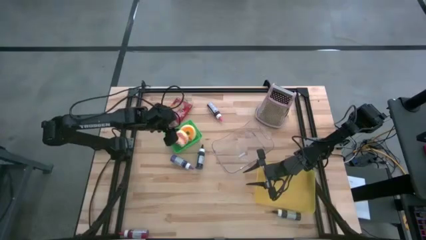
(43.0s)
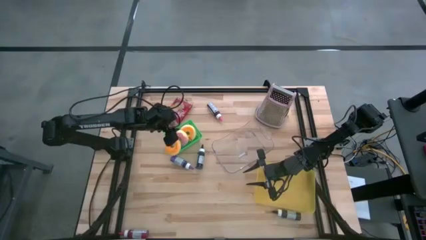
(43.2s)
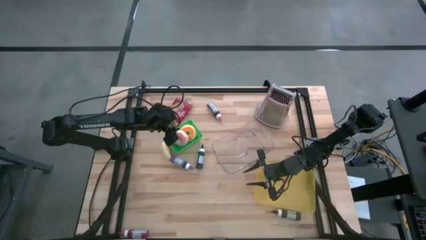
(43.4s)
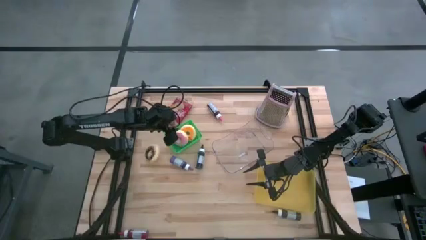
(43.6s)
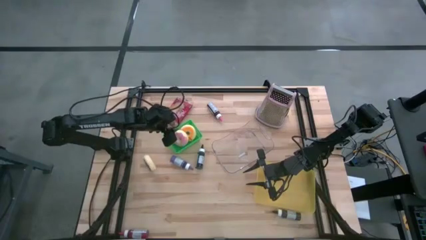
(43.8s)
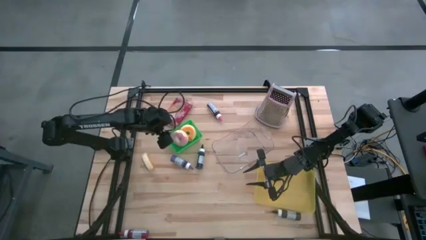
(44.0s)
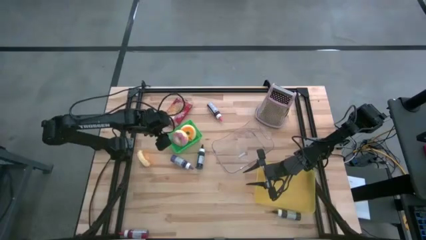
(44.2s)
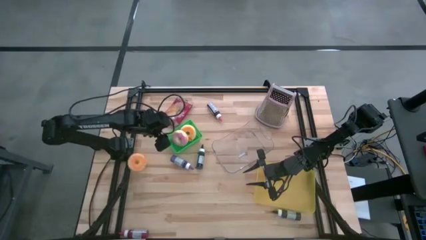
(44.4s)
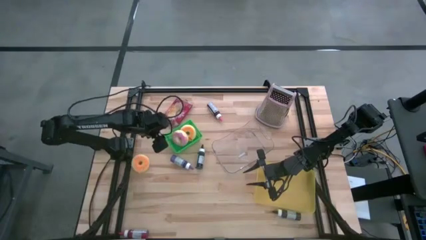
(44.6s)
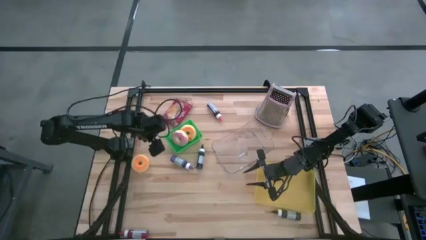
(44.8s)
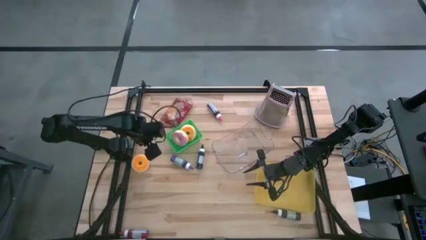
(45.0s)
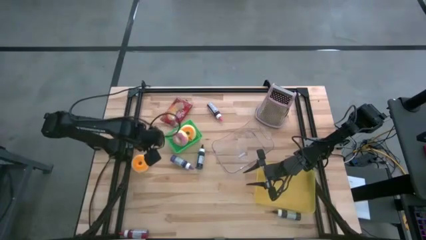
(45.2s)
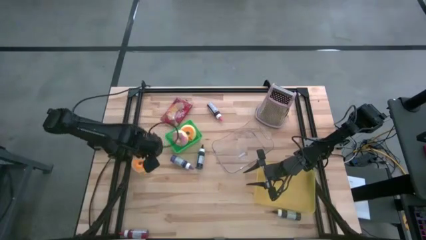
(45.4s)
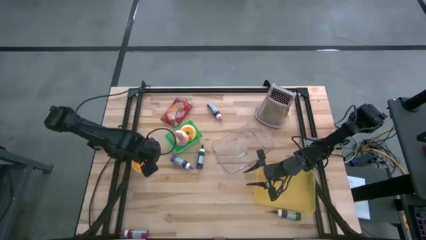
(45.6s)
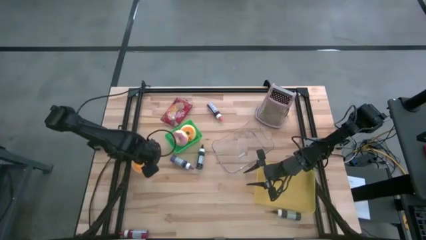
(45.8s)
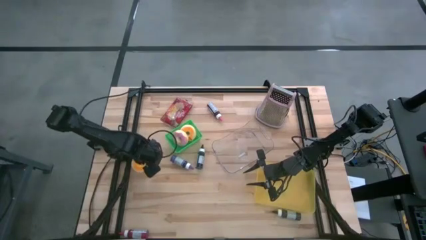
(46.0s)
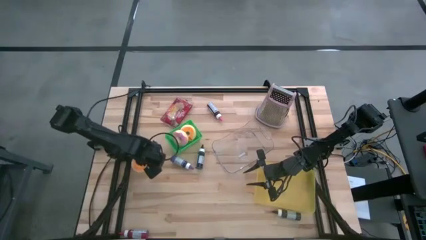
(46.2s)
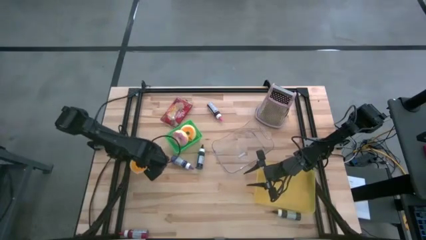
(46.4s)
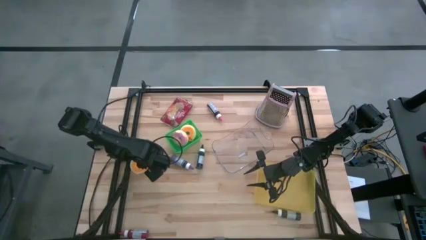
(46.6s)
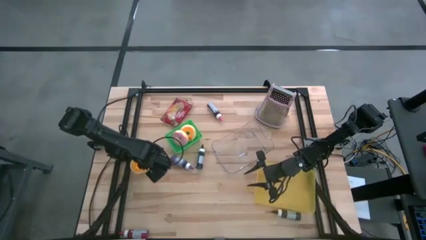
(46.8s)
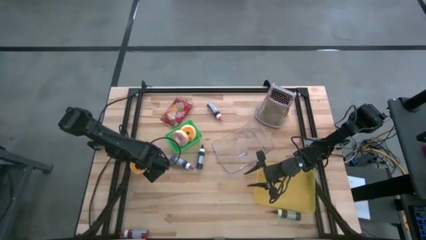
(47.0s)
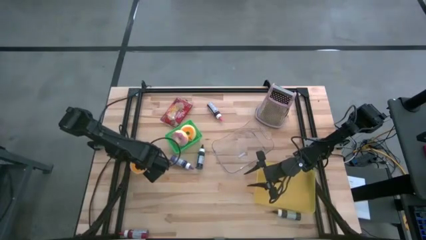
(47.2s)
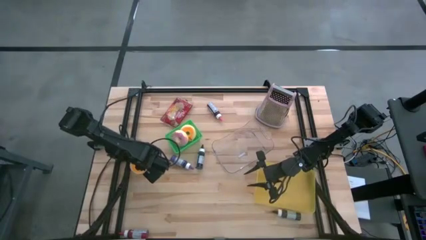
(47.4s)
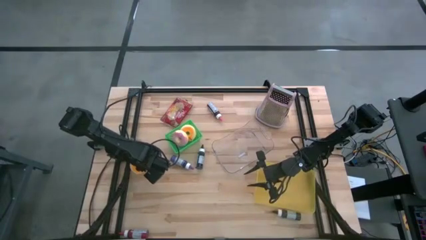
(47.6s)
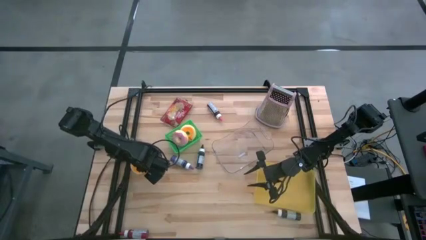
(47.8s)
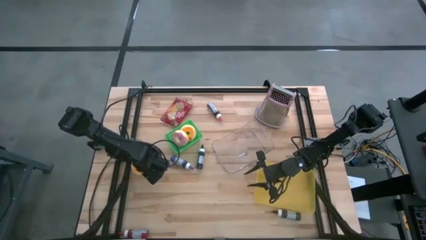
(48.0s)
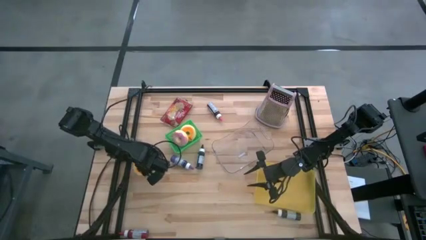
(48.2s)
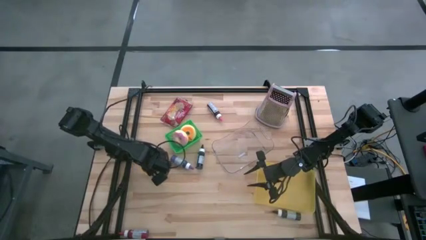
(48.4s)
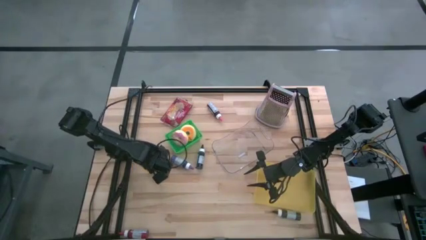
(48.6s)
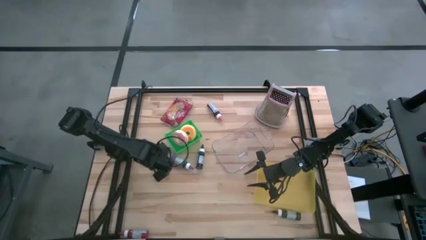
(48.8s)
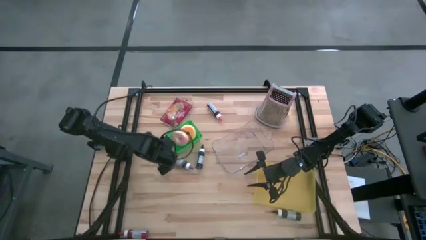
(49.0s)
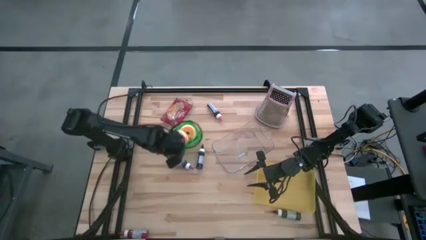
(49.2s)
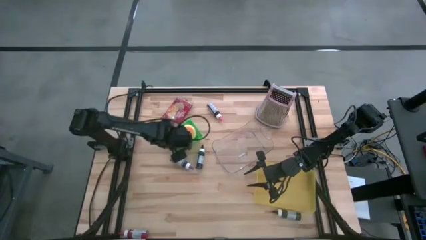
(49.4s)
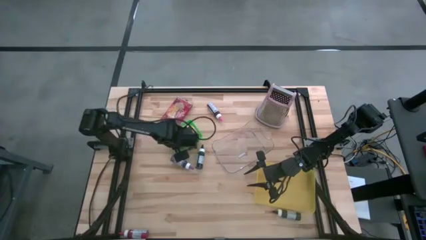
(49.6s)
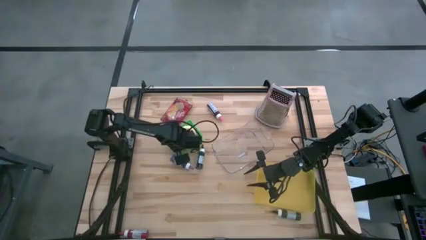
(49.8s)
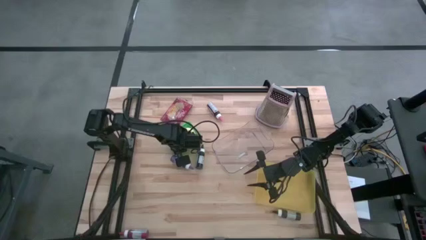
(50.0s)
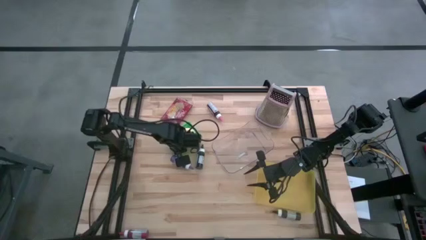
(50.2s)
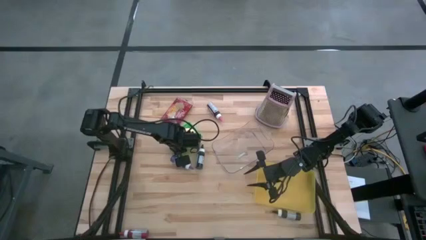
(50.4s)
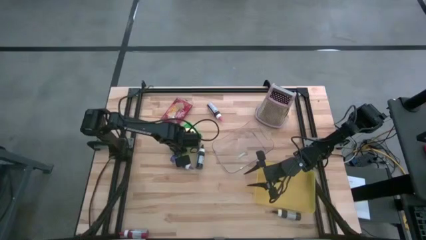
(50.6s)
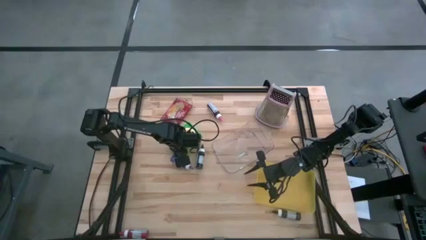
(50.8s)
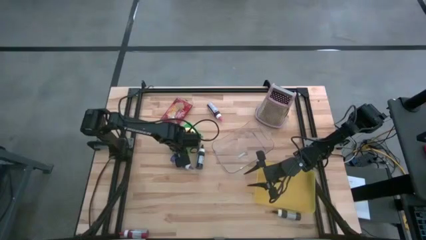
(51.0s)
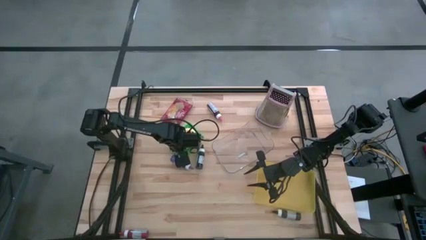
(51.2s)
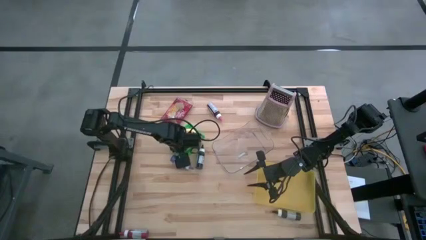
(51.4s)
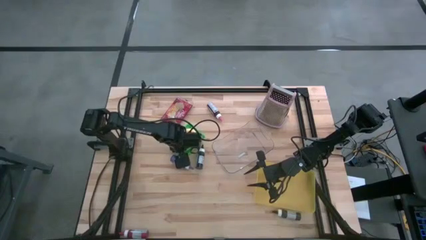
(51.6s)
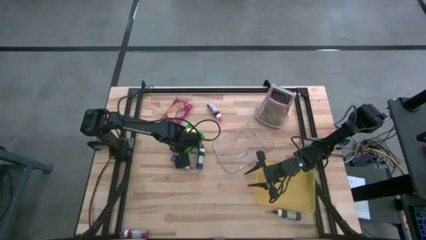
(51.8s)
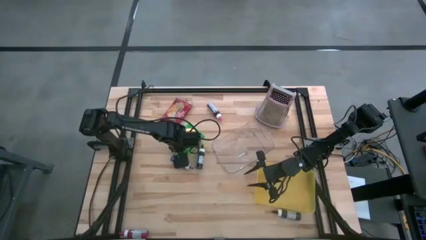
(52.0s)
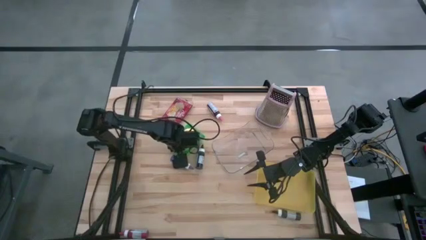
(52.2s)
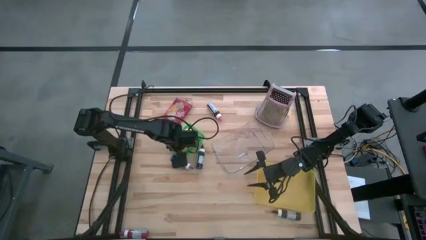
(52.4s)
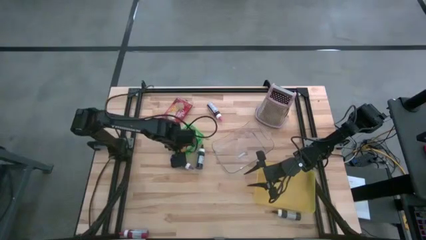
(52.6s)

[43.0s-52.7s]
Task: Pick & Place Food Item
Put the black donut into the green bin

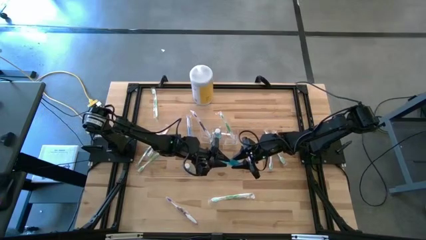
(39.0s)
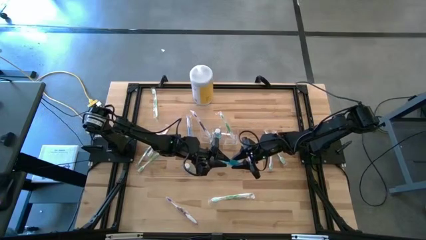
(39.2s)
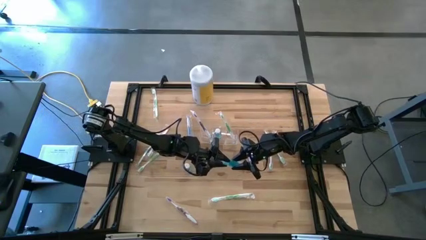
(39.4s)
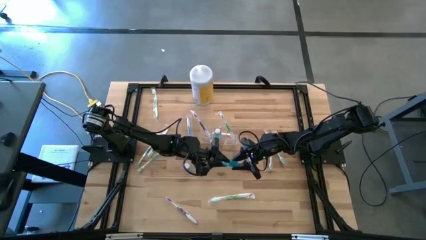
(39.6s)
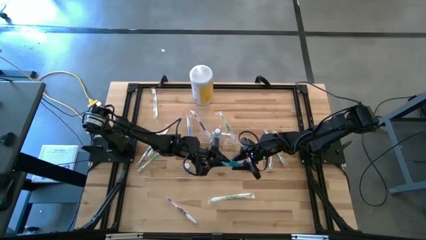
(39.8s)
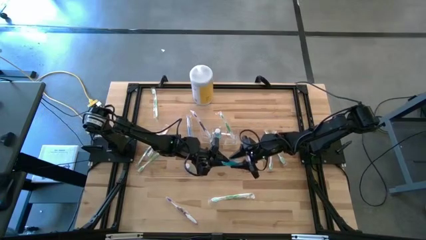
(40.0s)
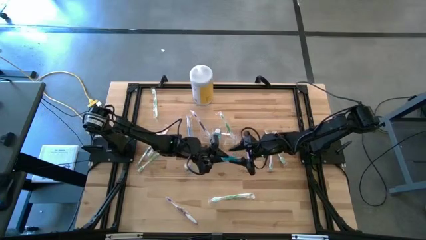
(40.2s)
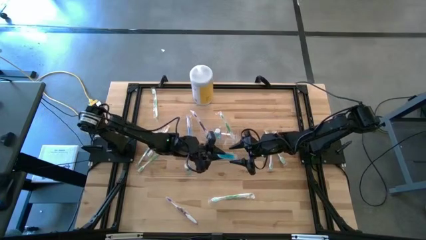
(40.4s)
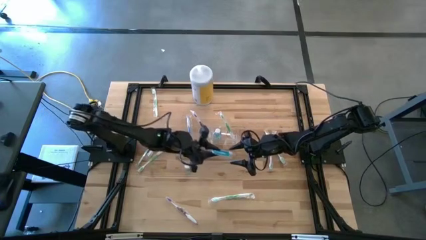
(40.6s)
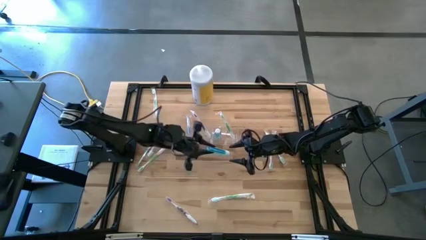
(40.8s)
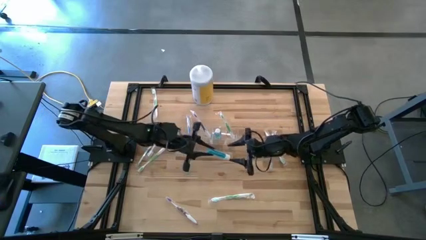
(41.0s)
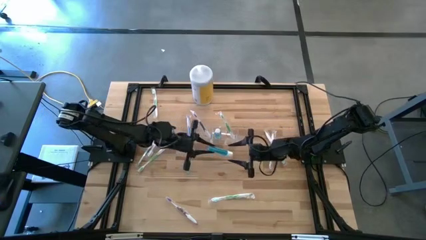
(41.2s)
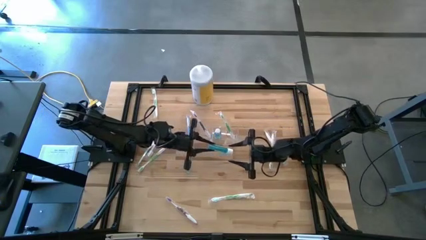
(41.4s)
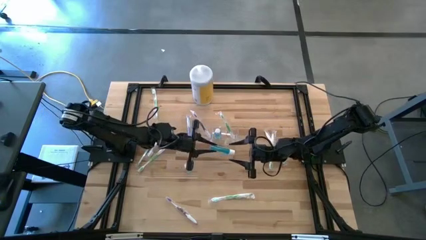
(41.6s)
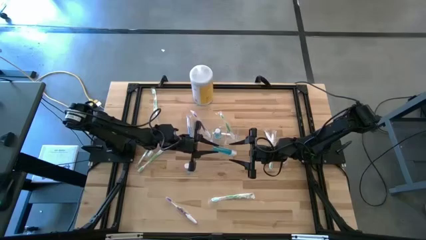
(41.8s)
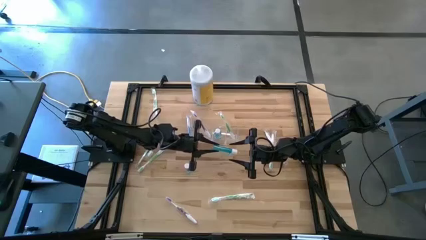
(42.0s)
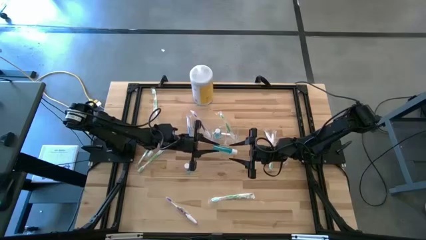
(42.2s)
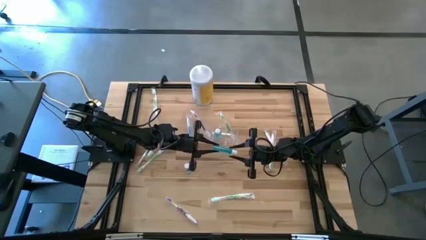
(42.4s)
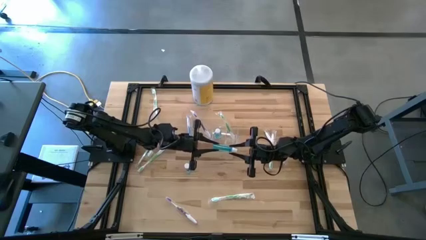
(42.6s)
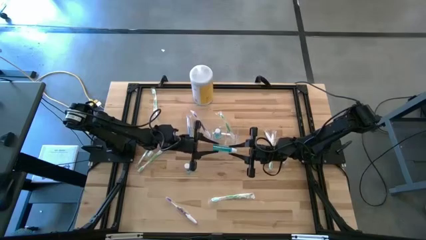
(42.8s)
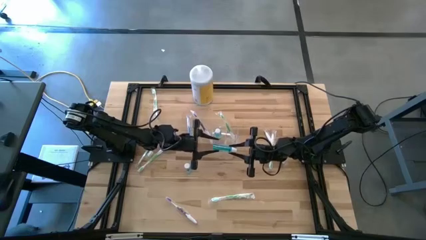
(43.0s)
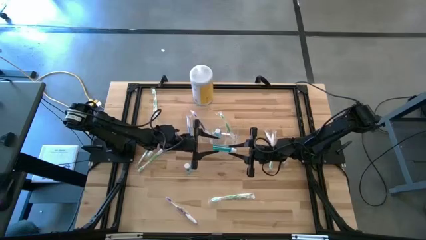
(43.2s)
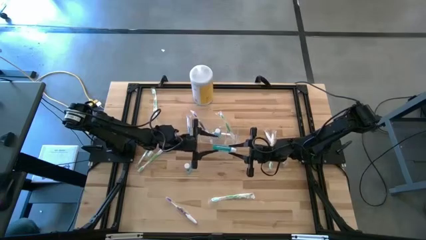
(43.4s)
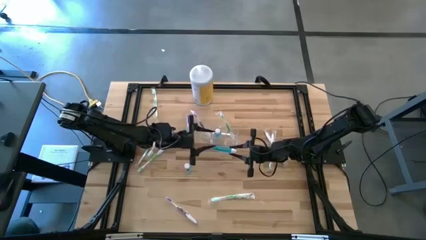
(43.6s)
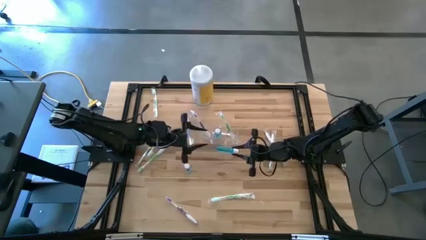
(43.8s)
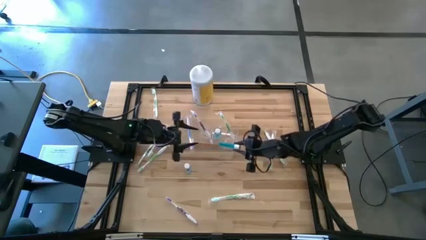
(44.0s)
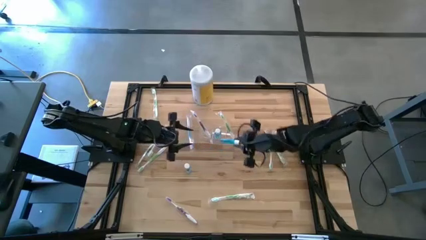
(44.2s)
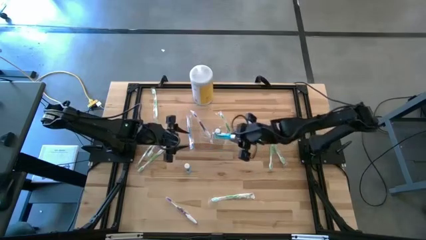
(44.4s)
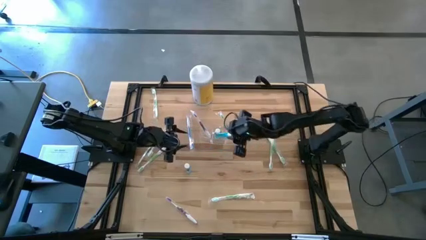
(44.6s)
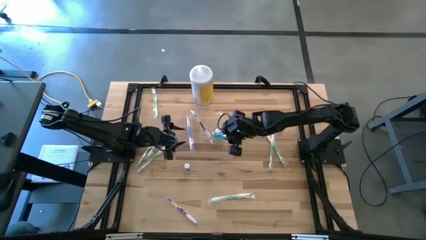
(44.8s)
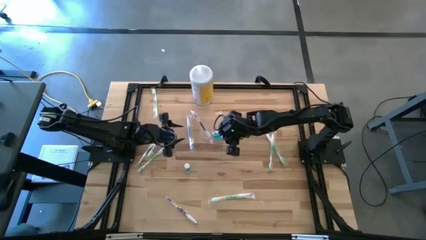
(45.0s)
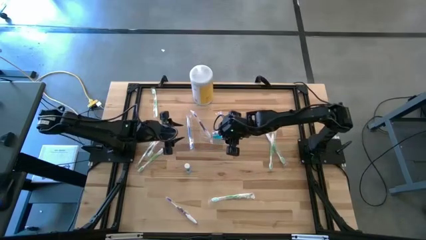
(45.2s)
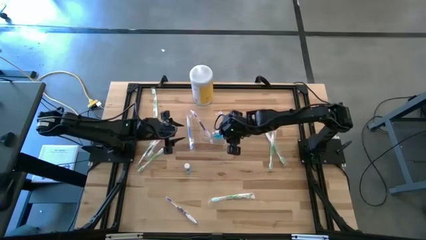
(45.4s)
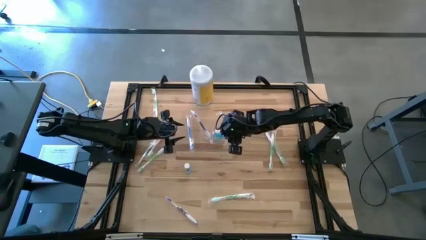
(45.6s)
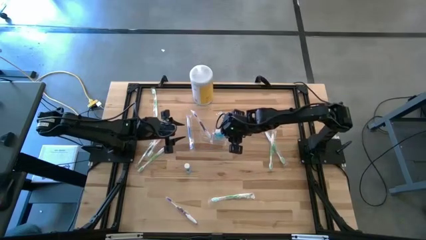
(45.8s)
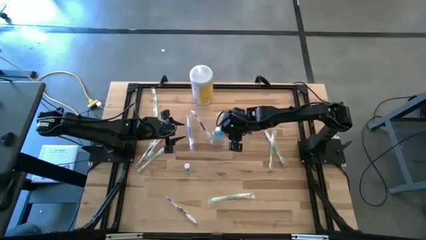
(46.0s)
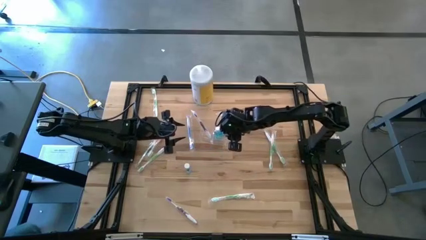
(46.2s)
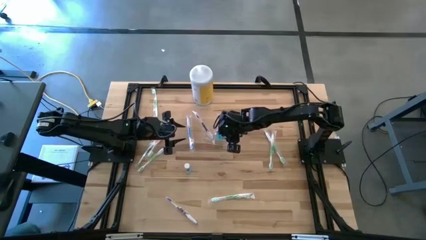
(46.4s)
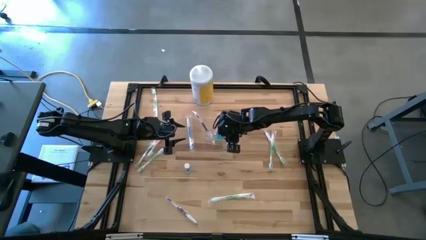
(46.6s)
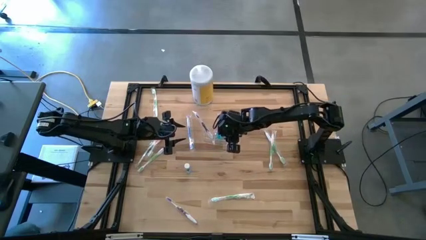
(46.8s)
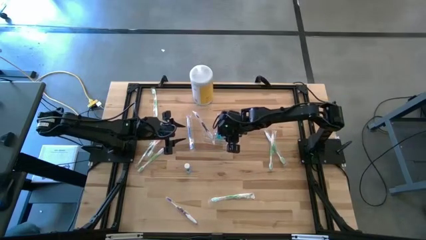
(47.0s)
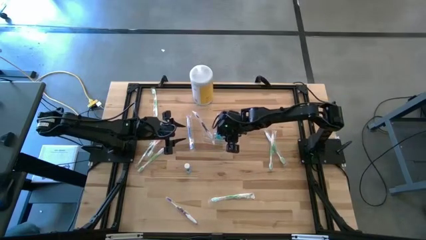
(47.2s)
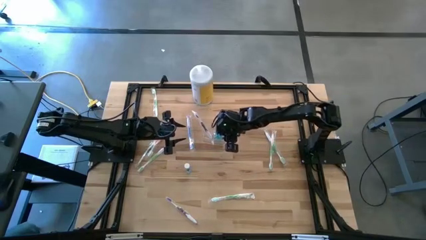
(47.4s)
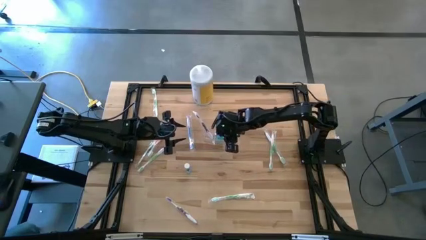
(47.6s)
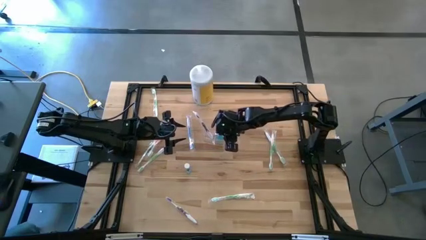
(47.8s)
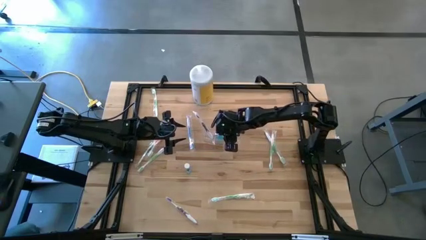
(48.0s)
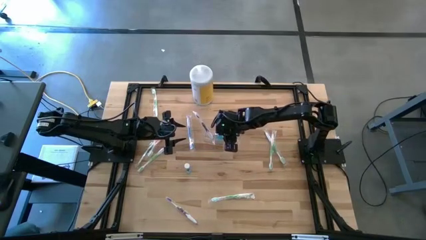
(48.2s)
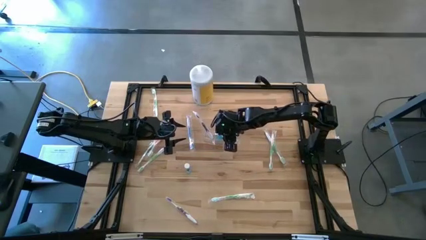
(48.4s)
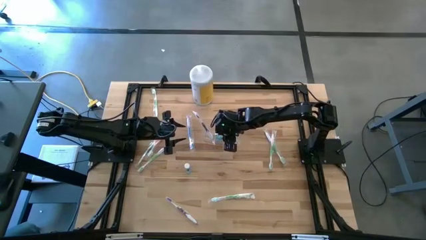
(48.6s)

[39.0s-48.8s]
Task: Pick & Place toothbrushing station
Put the top mouthwash into the middle section of the transparent organizer
